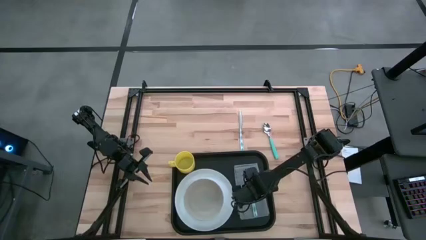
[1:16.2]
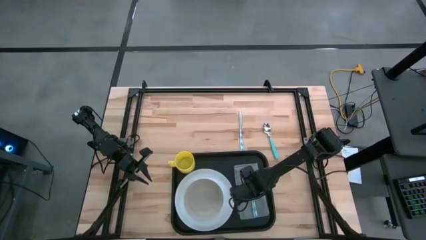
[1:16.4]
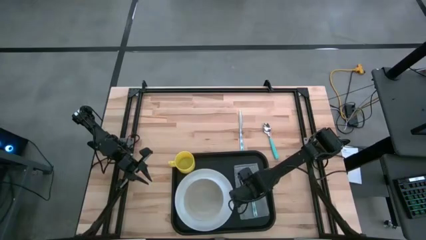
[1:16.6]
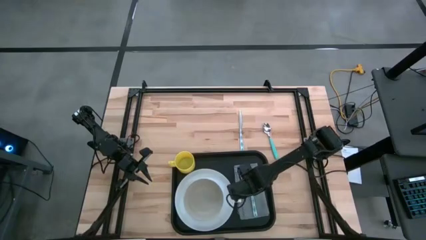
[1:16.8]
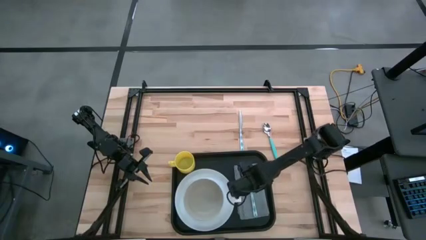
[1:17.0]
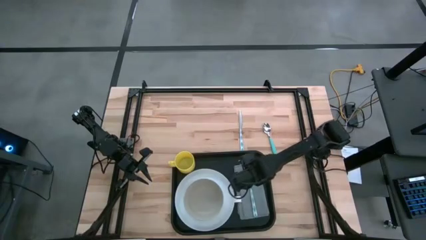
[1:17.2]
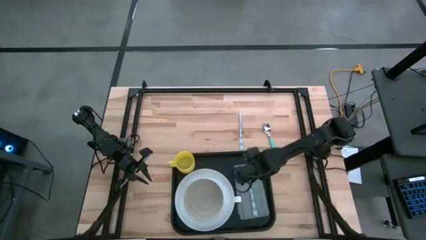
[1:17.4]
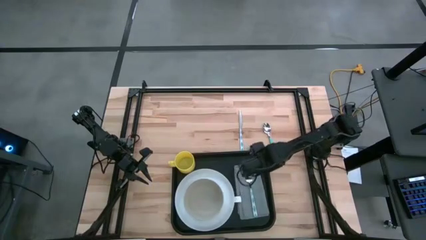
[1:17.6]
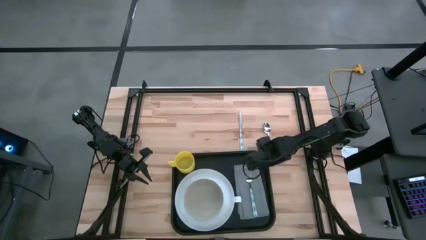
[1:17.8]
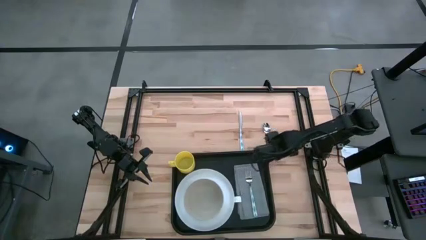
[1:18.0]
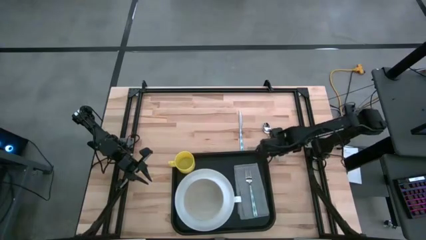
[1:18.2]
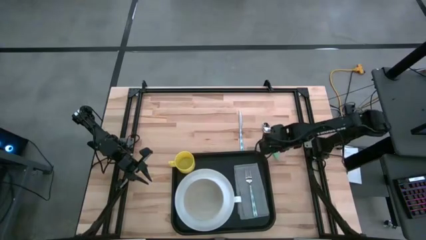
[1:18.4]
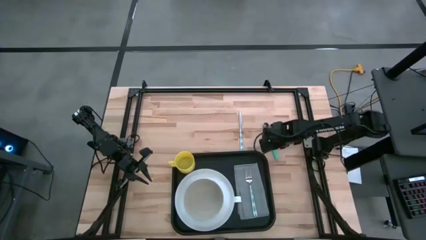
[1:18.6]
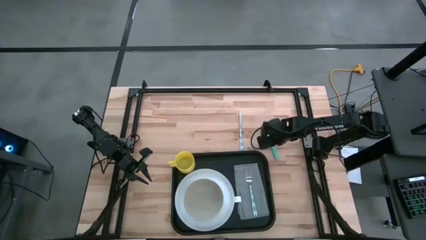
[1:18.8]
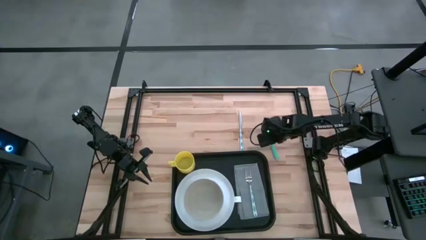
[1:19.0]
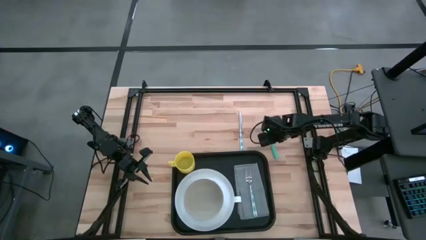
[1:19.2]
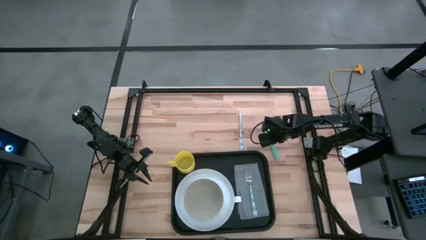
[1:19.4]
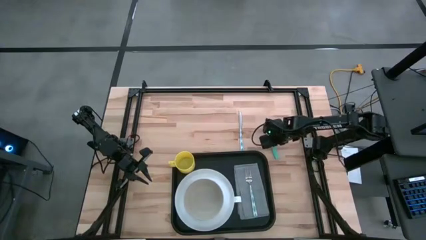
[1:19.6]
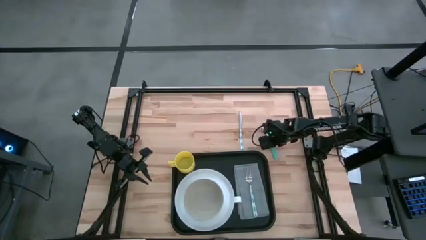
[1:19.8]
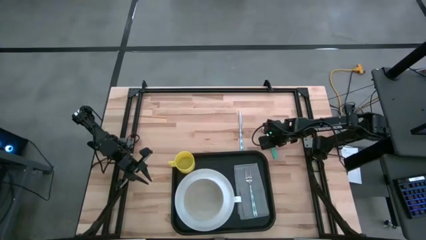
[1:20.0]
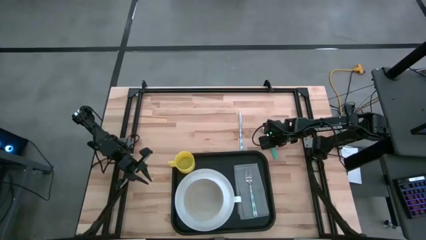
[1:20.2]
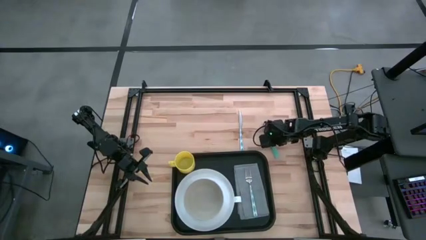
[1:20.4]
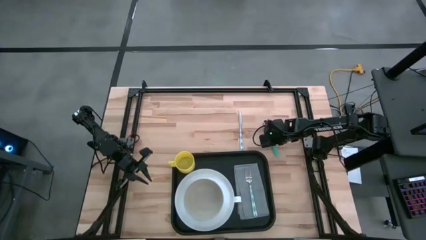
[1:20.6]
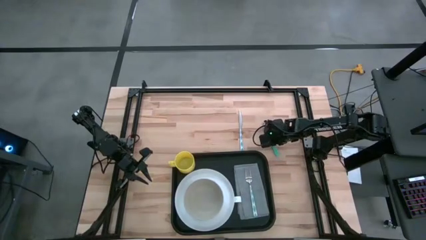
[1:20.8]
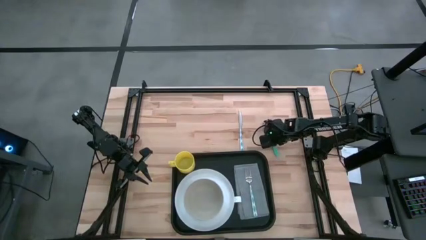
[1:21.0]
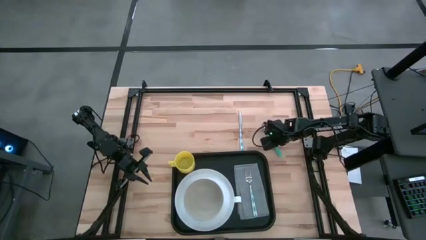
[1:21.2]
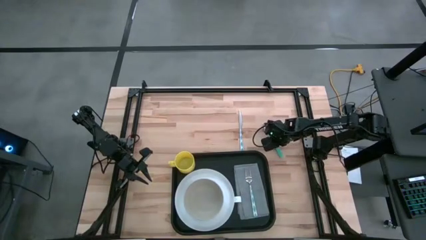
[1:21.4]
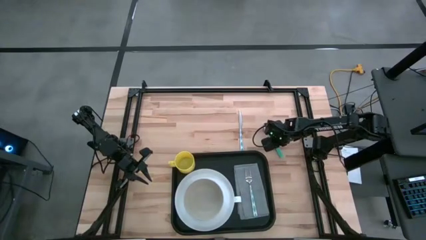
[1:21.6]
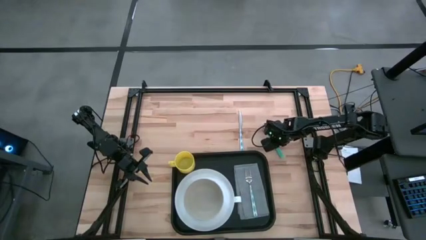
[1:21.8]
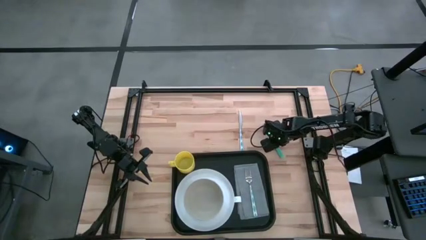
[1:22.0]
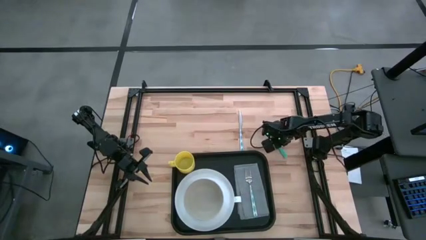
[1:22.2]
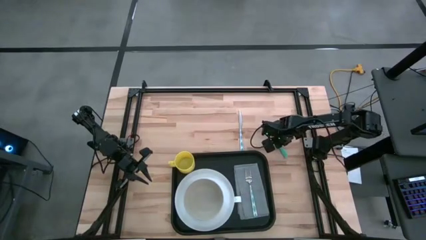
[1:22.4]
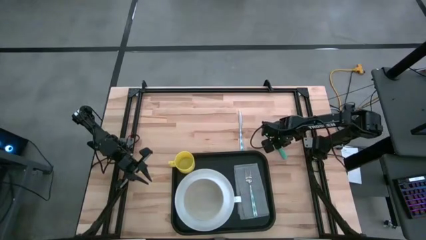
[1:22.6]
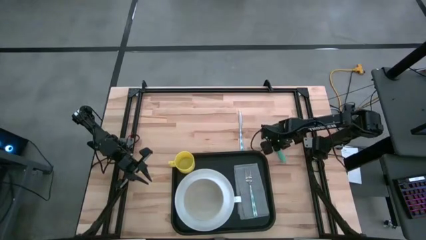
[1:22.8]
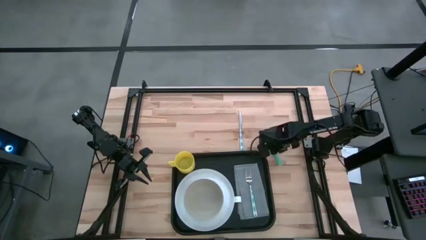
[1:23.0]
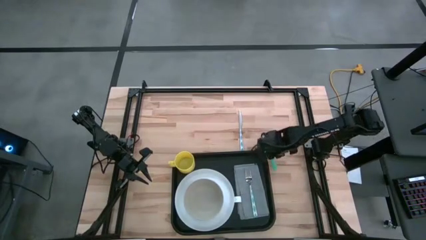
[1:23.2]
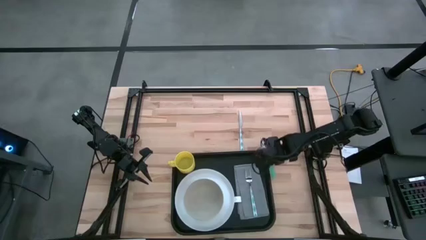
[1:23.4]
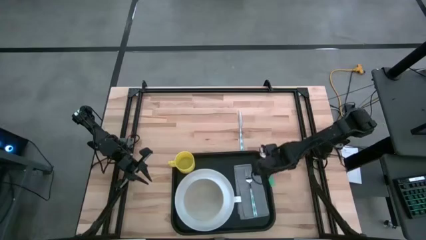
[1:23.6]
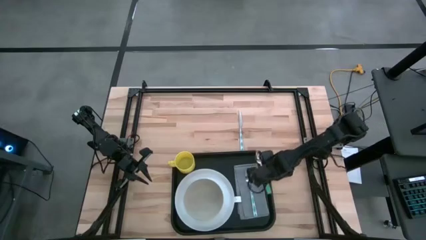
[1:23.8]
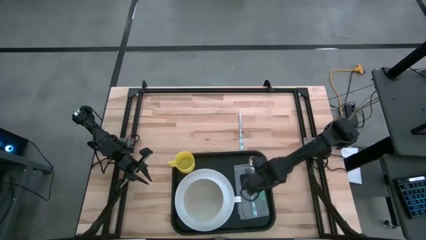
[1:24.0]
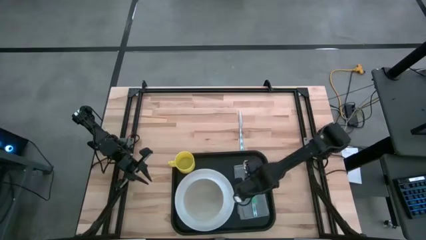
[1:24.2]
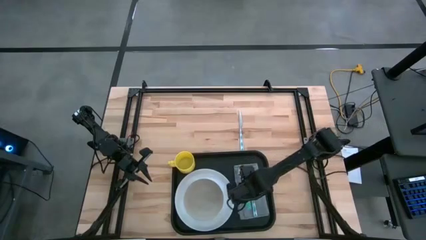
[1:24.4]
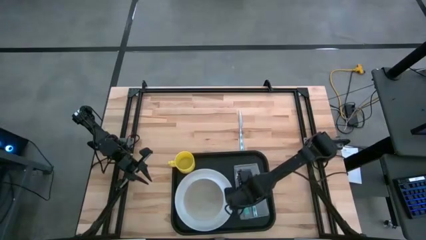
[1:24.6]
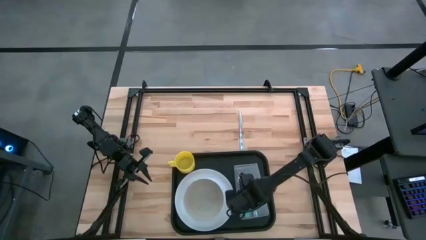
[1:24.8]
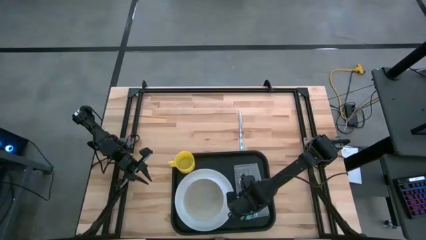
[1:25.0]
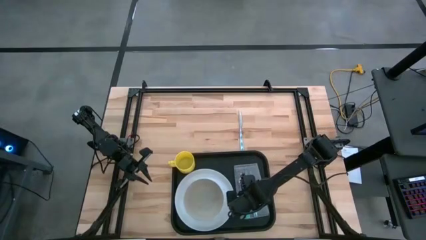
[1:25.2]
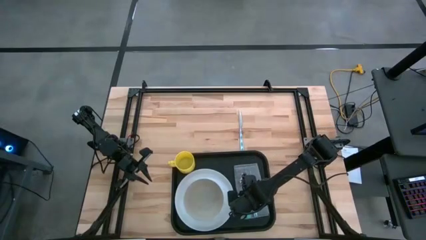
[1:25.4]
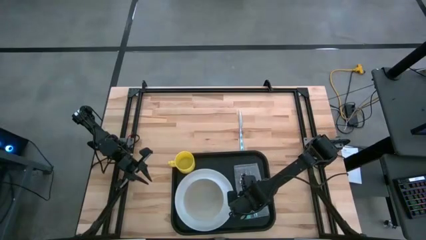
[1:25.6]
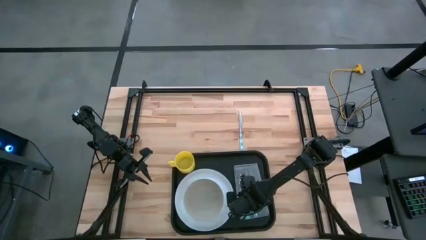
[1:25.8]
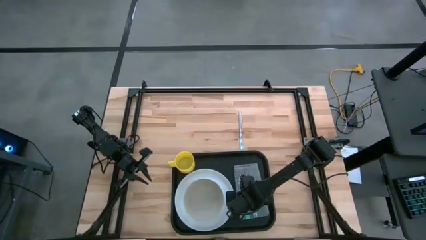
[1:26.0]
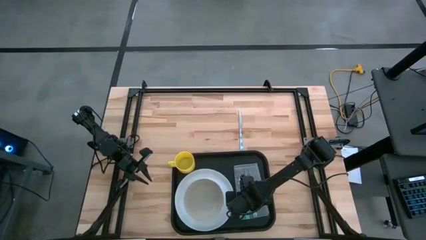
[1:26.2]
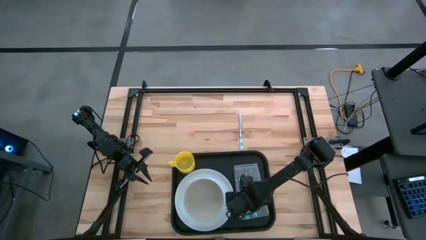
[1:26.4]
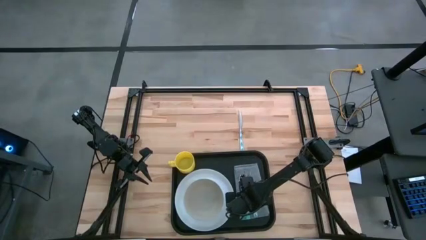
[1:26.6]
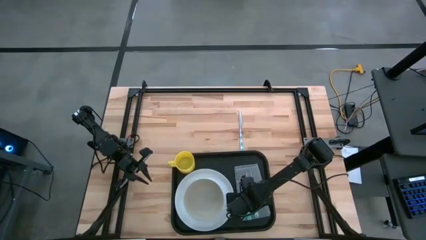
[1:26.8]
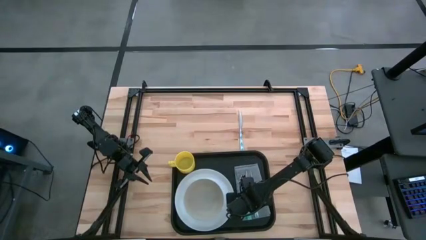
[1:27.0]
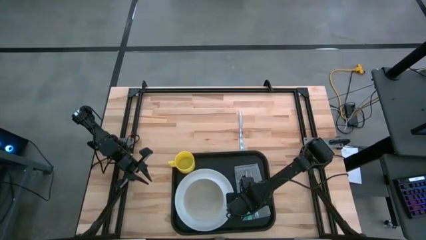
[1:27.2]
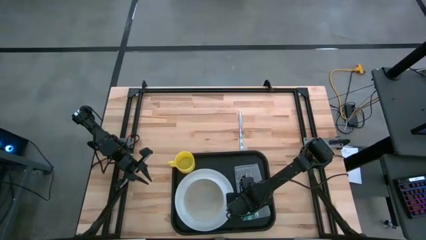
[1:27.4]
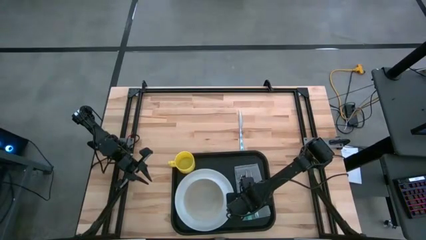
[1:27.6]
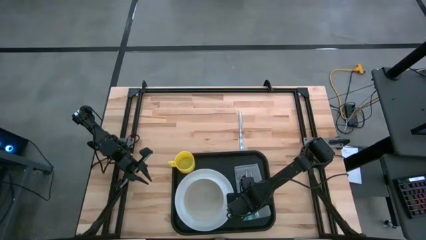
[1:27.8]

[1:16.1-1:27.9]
Task: Set up tray
Put the blue spoon on the gray napkin to the left of the blue fork

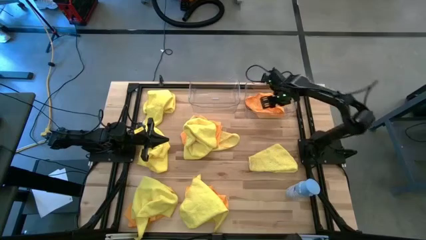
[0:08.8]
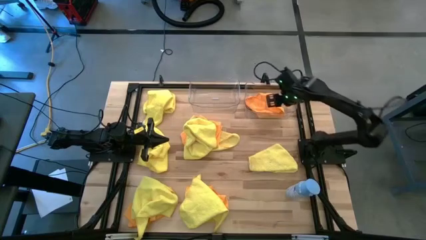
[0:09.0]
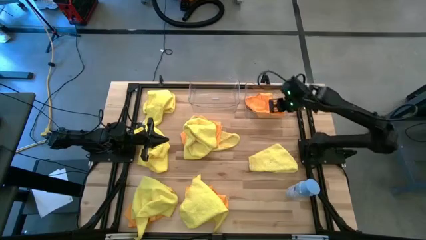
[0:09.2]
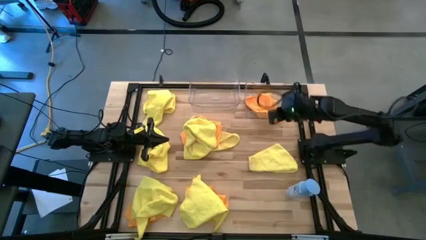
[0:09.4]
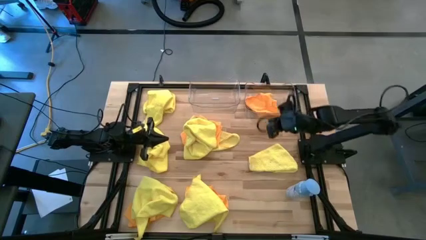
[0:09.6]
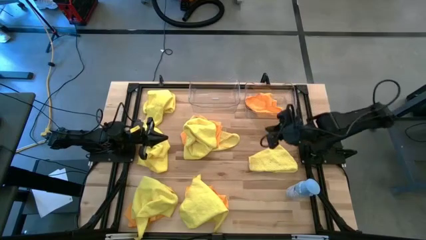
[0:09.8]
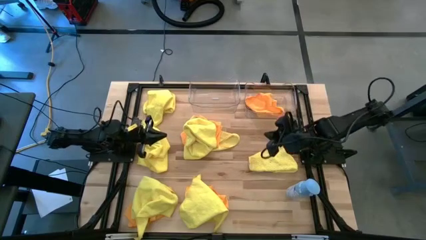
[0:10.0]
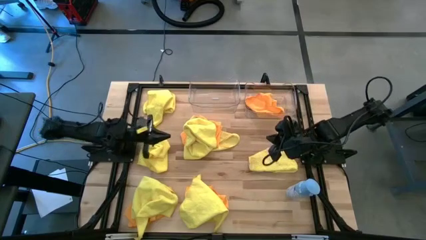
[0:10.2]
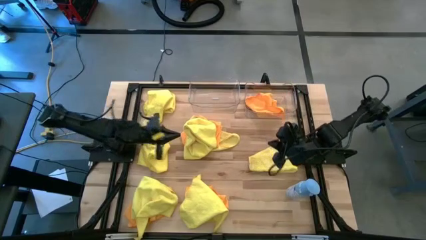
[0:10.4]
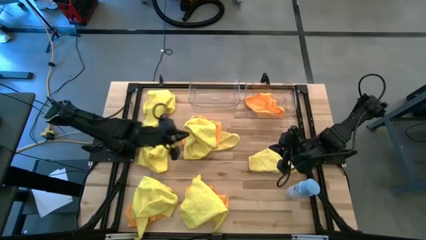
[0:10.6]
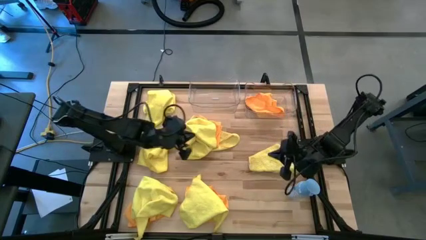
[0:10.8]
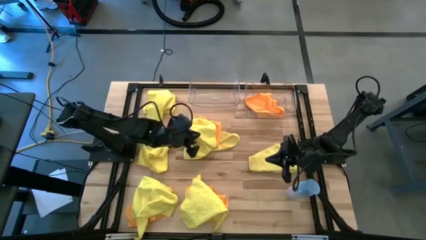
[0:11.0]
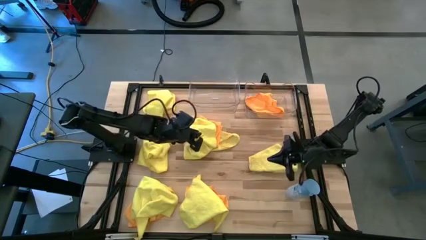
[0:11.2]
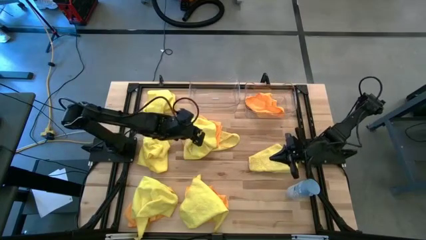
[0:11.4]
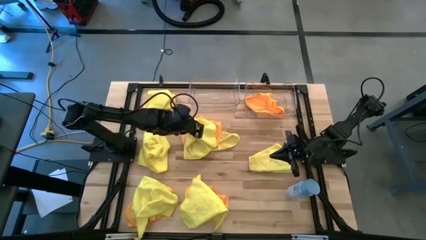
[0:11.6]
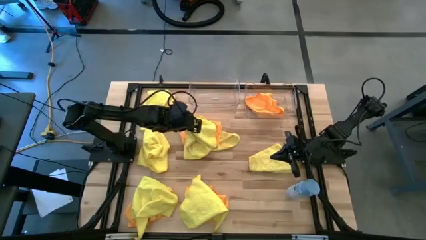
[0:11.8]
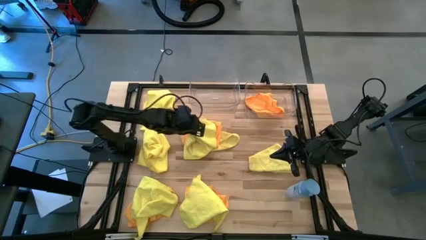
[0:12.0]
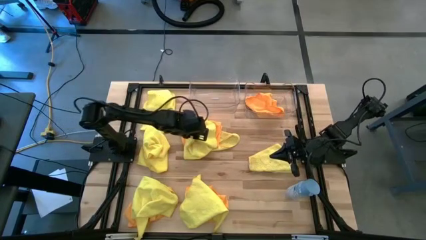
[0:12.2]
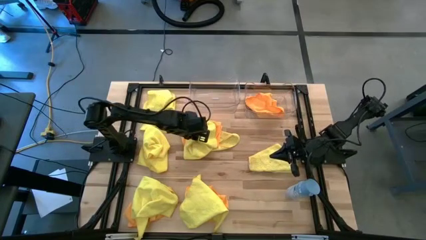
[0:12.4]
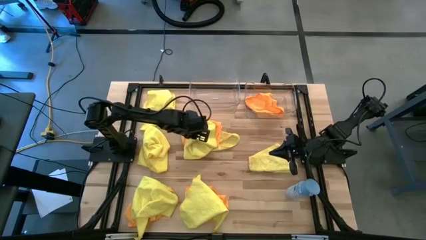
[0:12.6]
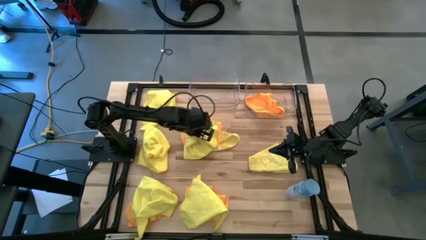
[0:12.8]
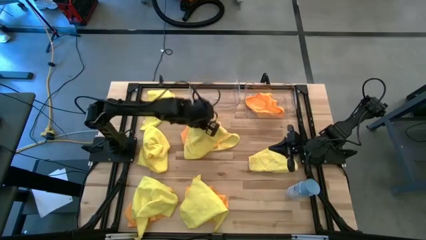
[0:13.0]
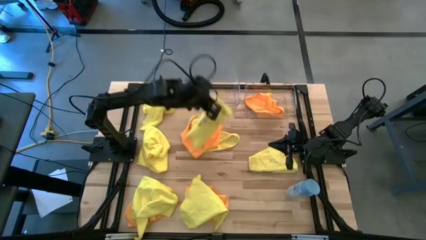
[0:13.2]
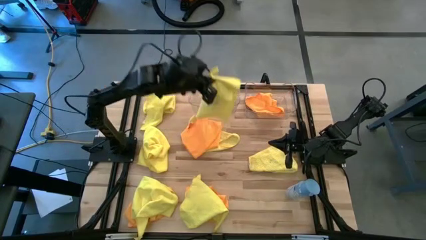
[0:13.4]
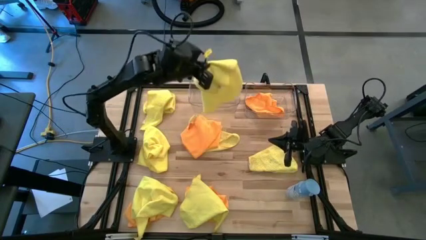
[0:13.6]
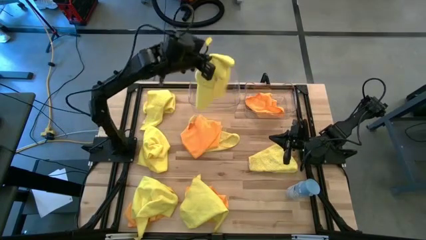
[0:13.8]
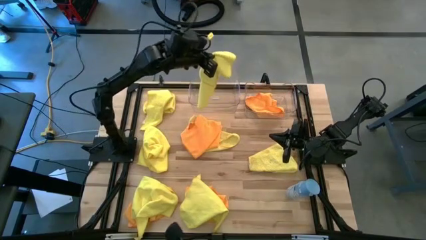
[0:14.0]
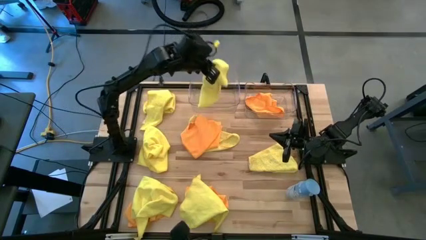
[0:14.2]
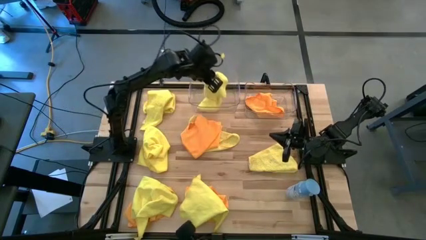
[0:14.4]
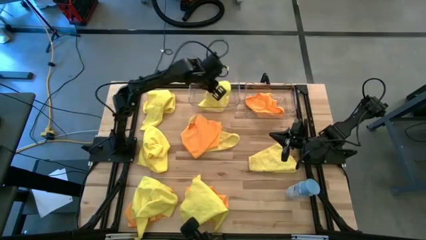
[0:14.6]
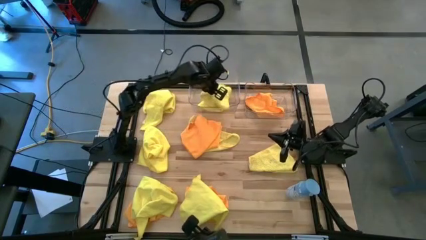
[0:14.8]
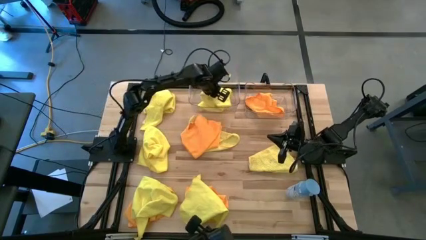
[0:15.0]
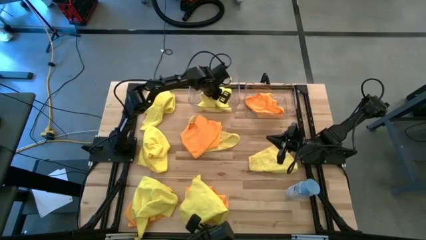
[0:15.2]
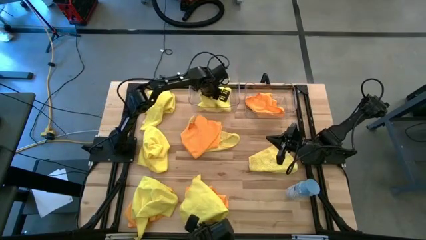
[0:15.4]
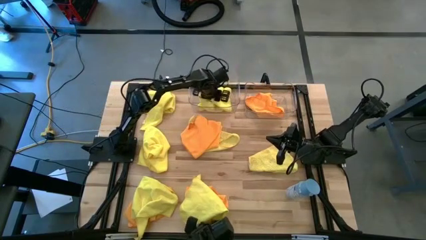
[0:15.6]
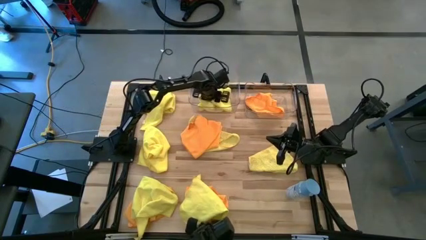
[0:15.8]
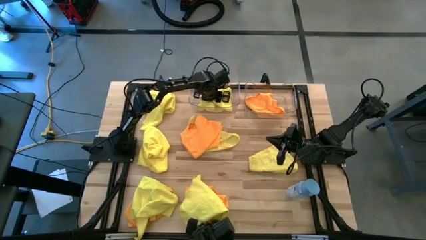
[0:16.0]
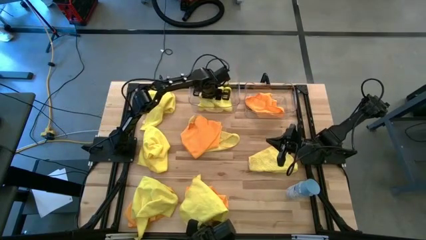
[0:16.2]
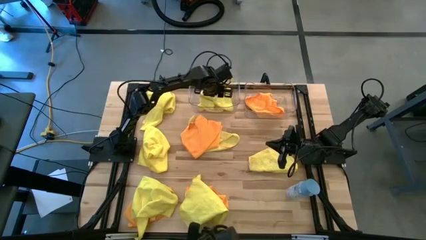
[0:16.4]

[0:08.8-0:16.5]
Task: Sort microfiber towel by color & place in baskets
Put the yellow microfiber cloth into the left transparent bin
